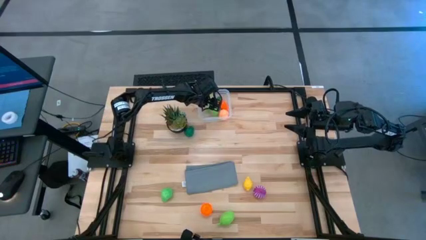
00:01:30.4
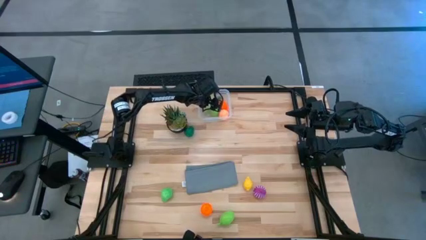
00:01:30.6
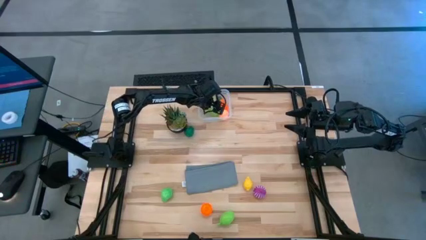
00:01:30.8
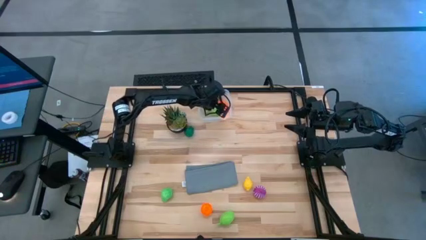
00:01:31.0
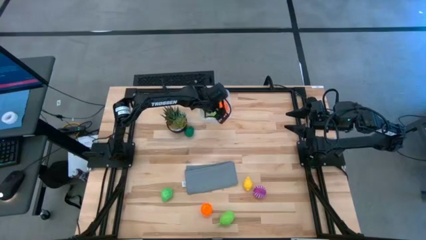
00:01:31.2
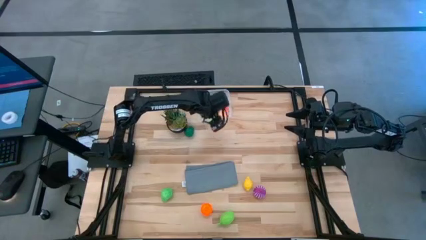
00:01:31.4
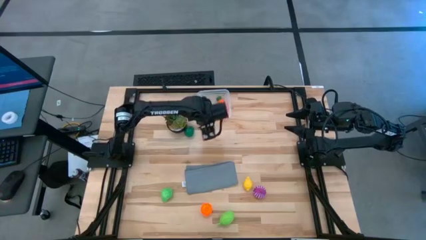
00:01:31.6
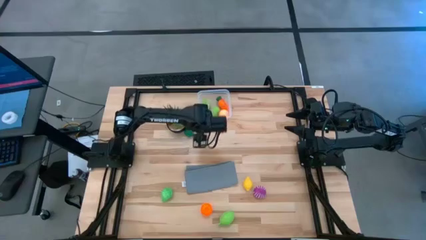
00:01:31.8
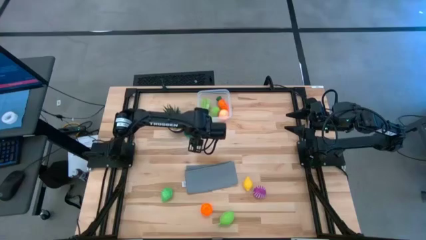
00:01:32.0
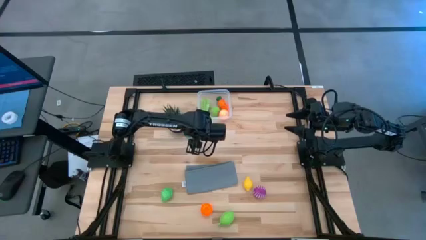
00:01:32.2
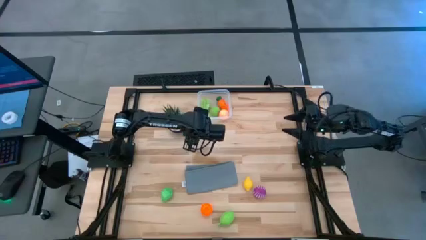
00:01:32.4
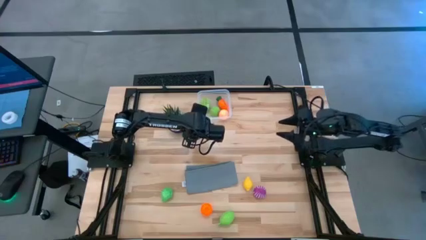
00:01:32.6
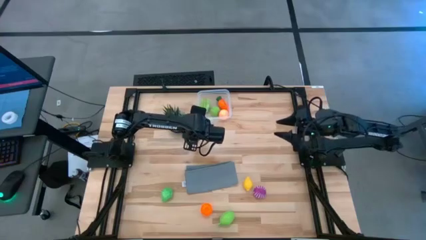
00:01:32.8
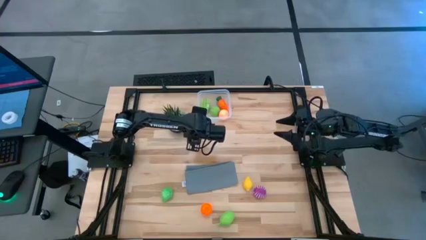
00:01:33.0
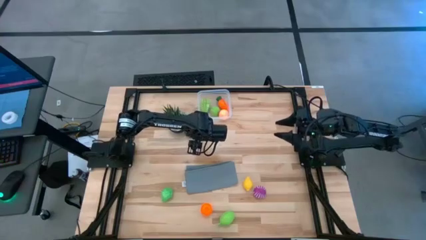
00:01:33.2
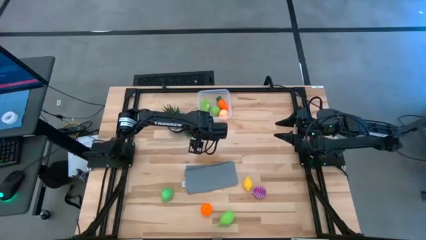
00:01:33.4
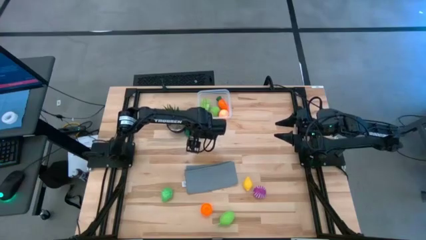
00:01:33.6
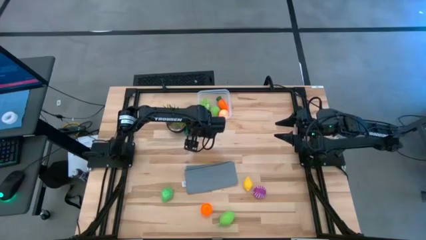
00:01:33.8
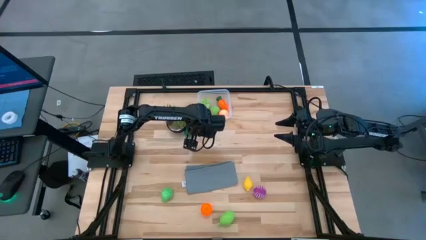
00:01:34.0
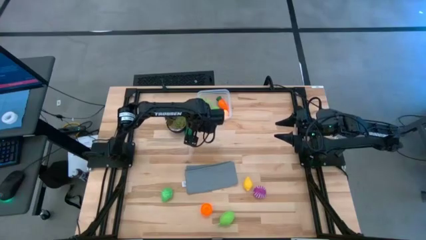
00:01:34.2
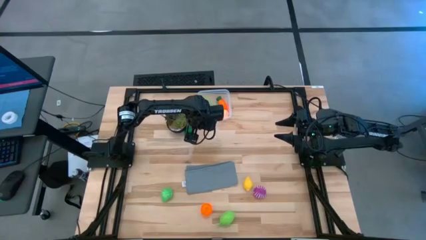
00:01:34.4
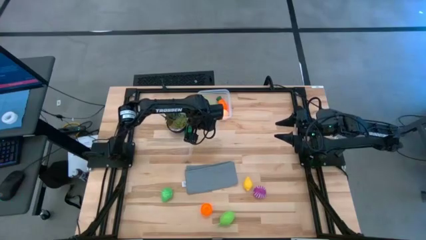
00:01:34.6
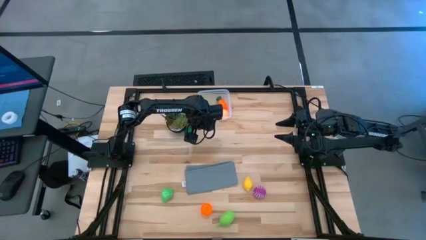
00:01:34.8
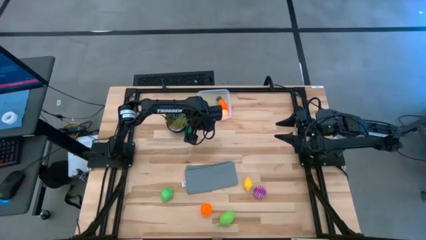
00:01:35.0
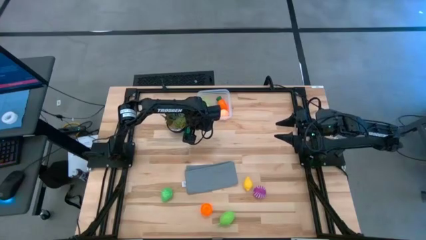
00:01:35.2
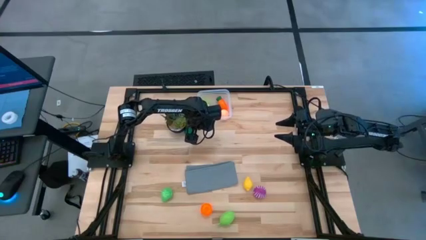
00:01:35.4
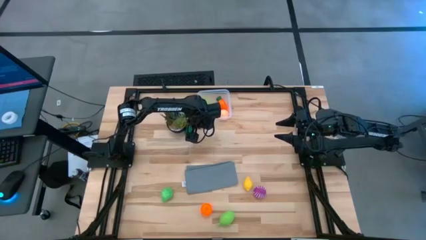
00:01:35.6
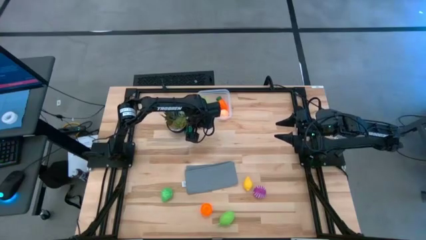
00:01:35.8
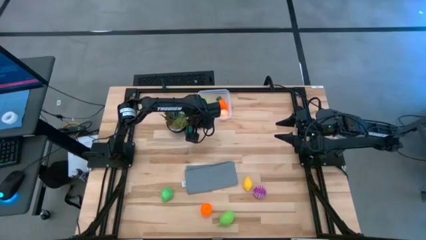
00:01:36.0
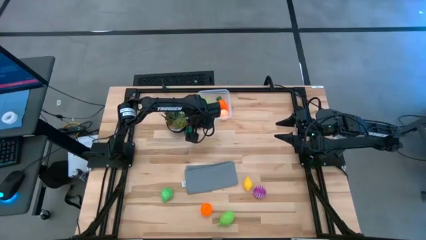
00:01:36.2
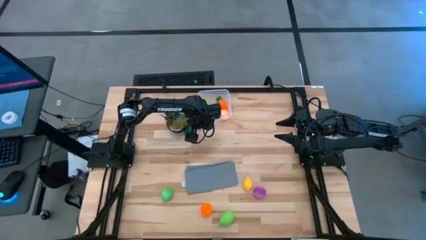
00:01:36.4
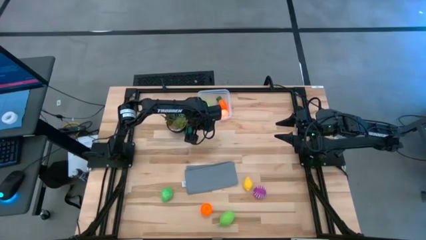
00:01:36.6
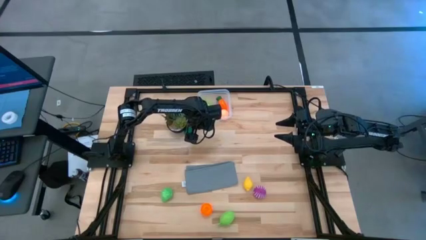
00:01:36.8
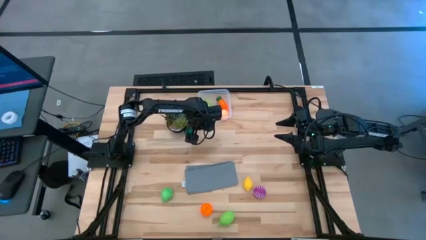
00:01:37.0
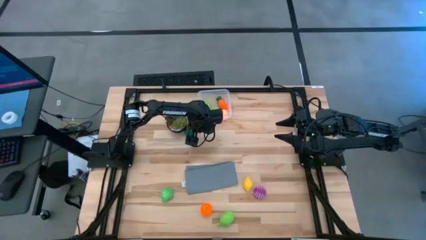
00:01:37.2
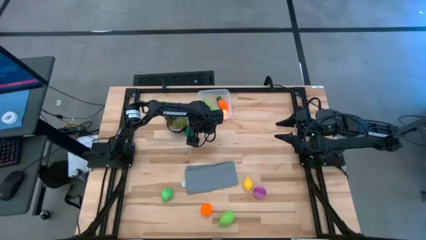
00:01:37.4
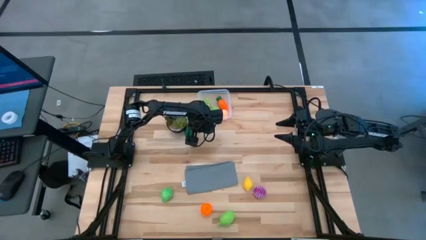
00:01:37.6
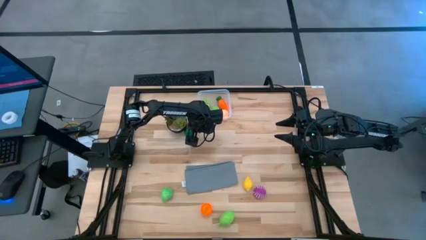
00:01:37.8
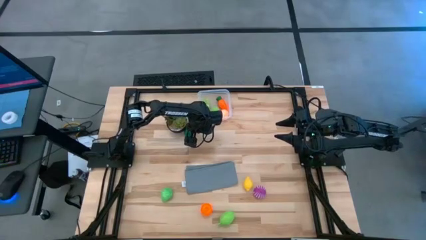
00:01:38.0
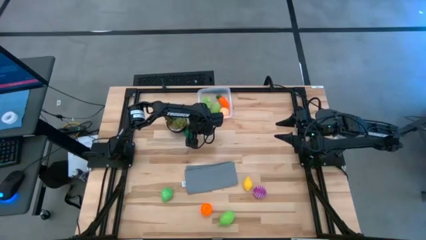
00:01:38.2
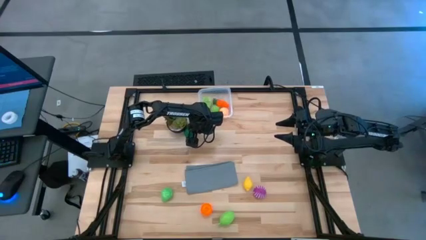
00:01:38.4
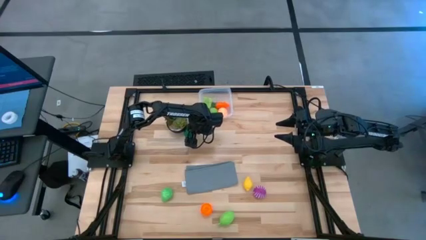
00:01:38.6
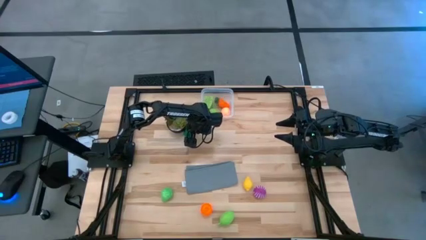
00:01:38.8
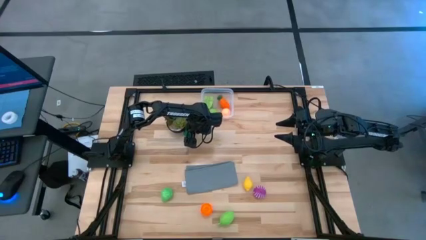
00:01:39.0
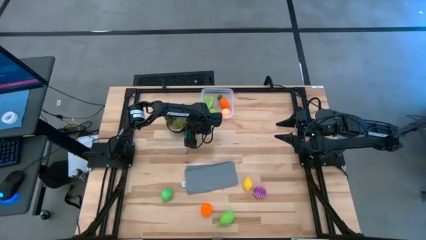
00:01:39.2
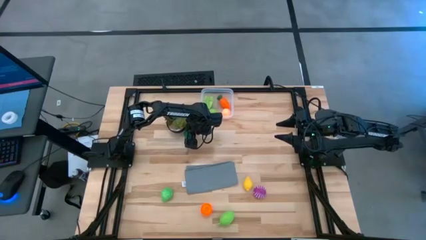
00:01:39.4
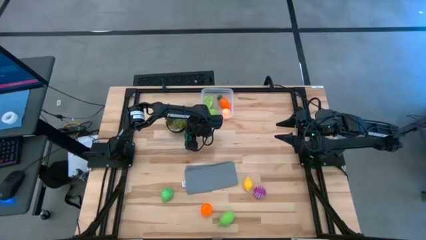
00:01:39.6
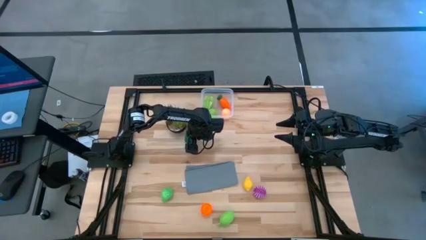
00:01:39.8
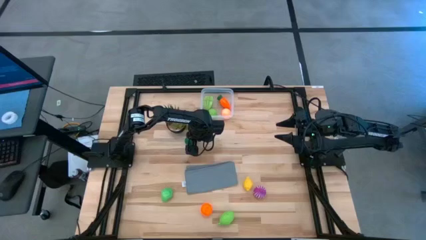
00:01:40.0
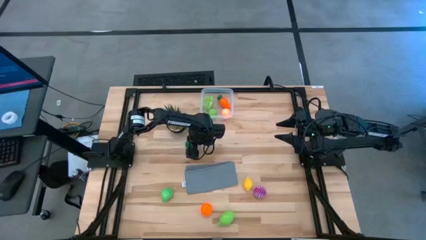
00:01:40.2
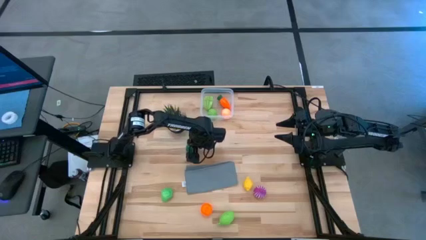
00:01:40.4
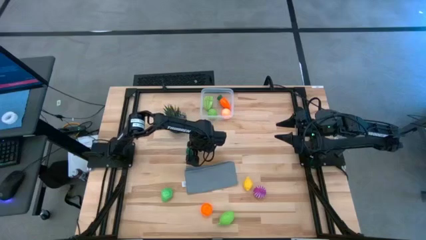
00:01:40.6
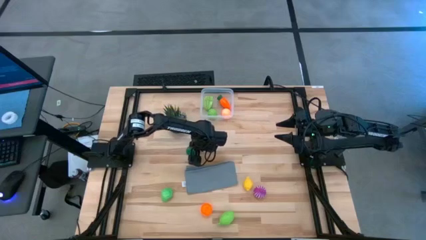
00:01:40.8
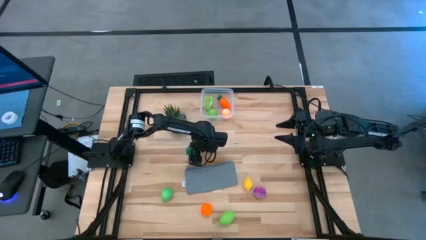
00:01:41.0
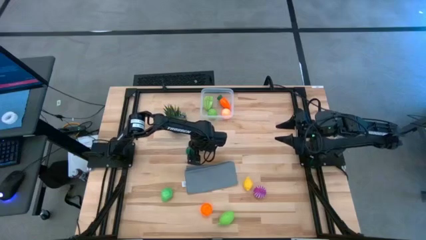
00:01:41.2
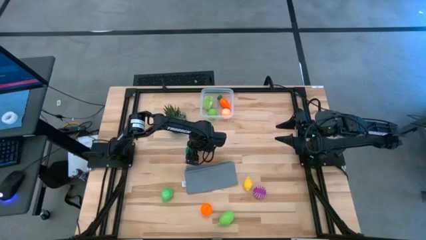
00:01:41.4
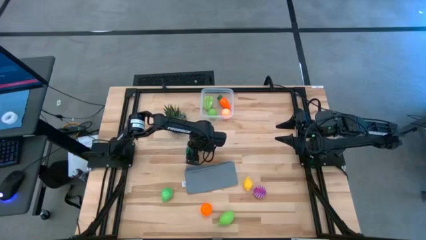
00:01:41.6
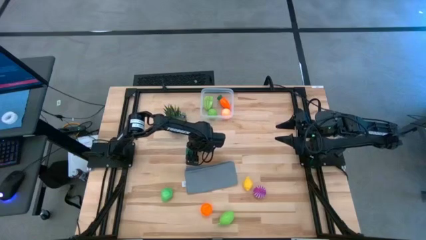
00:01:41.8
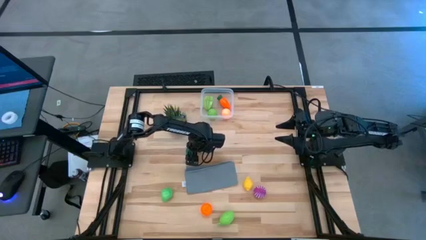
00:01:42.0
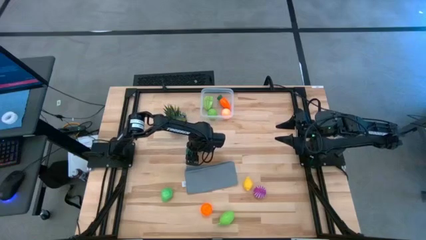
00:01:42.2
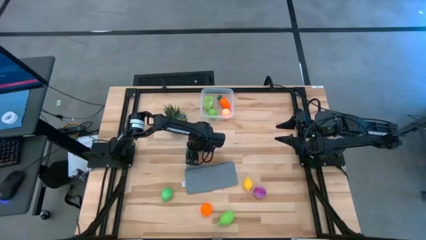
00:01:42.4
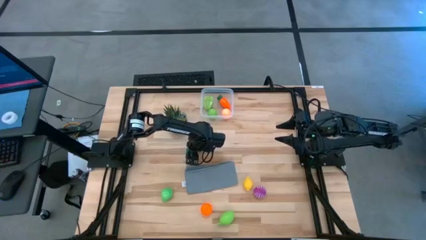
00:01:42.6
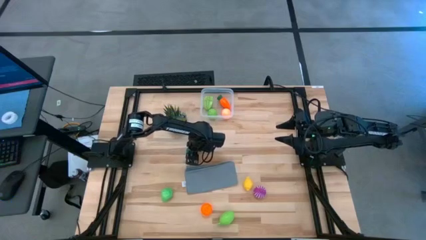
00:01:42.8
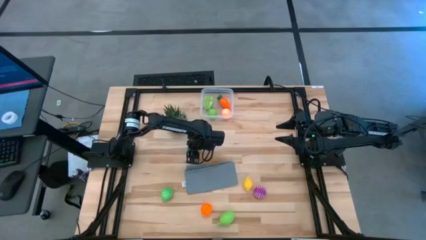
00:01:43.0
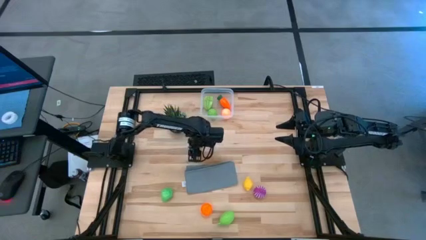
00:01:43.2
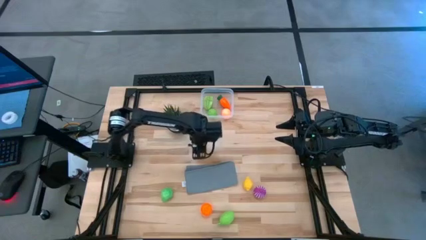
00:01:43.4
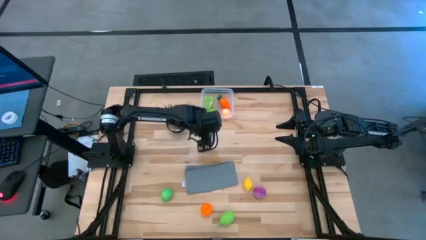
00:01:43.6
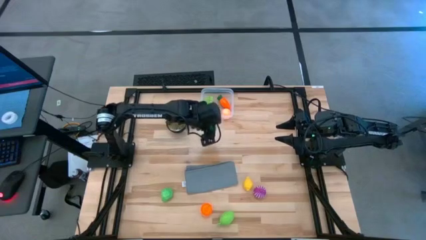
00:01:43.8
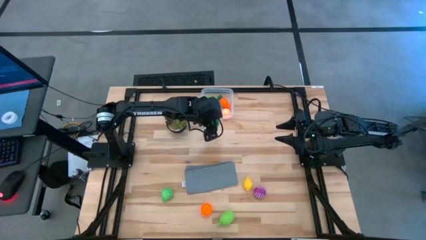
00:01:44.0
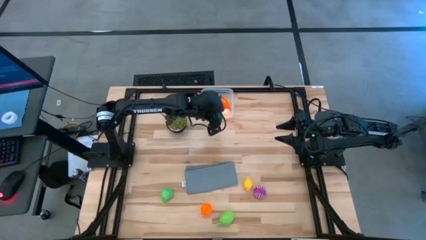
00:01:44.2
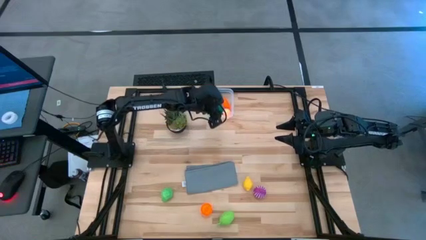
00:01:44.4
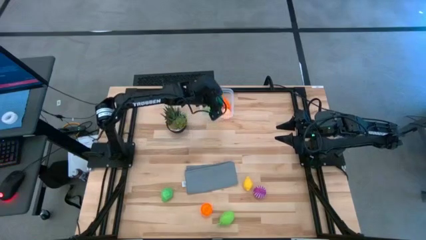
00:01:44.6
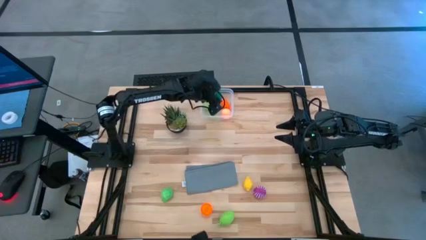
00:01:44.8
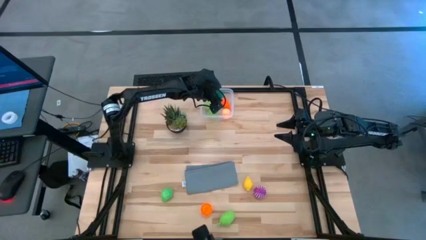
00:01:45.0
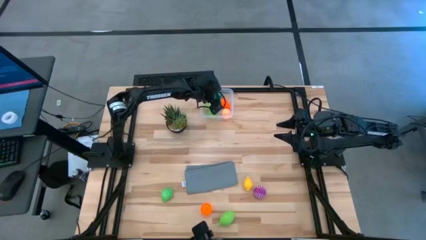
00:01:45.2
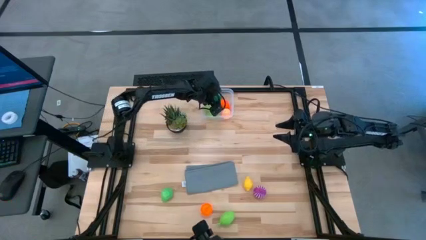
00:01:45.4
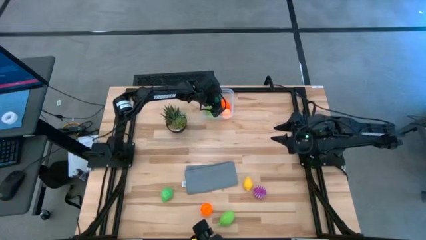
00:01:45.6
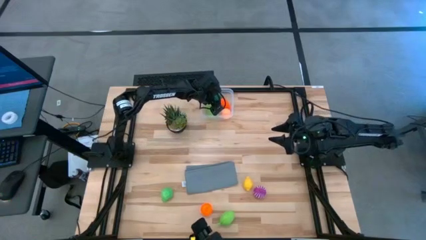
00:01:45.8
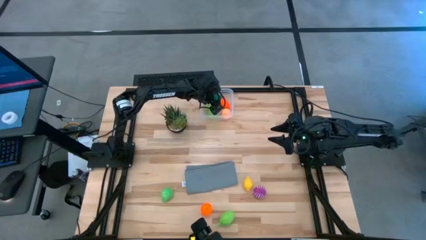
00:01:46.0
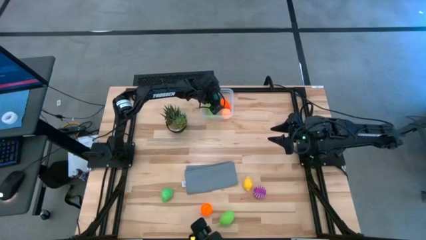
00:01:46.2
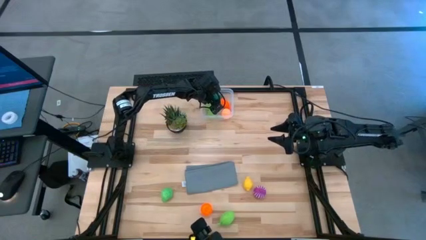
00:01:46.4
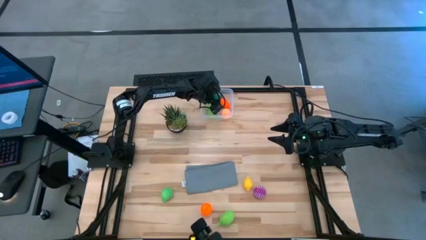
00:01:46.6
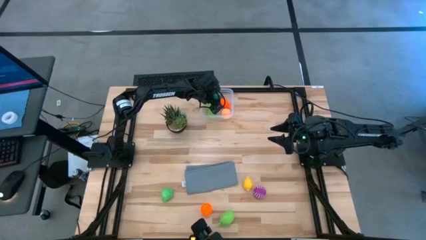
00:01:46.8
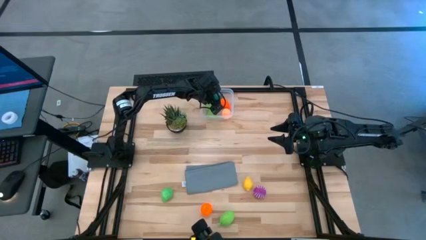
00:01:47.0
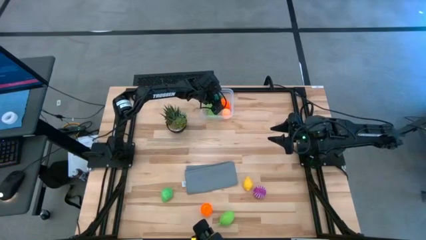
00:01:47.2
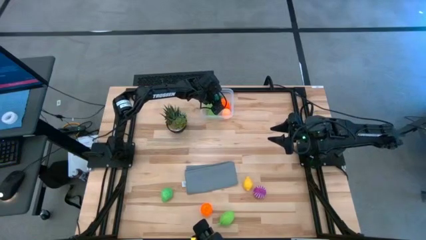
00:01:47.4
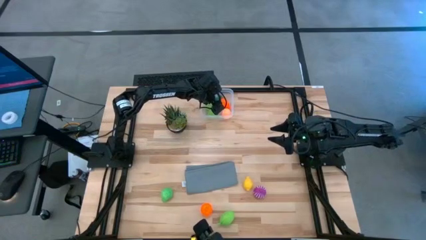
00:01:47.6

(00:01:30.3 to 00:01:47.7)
Task: Pick and placing Produce into tupperware
Put the bell pepper into the bin
